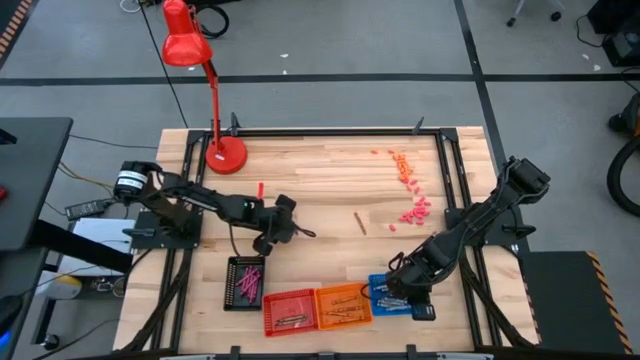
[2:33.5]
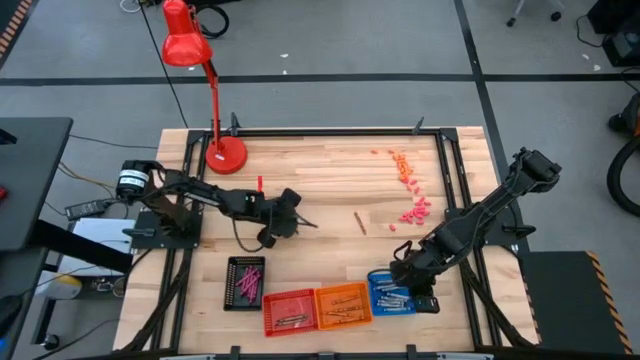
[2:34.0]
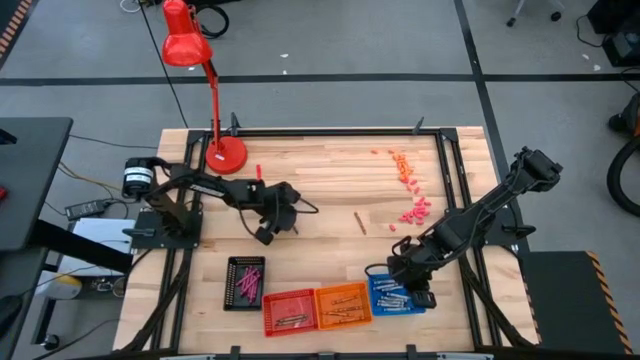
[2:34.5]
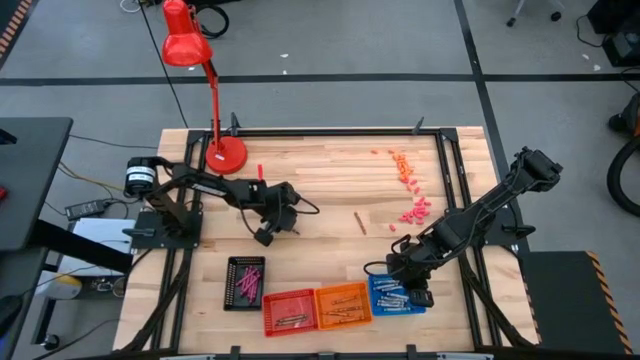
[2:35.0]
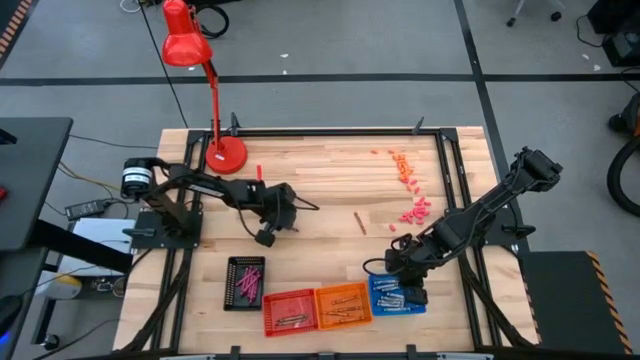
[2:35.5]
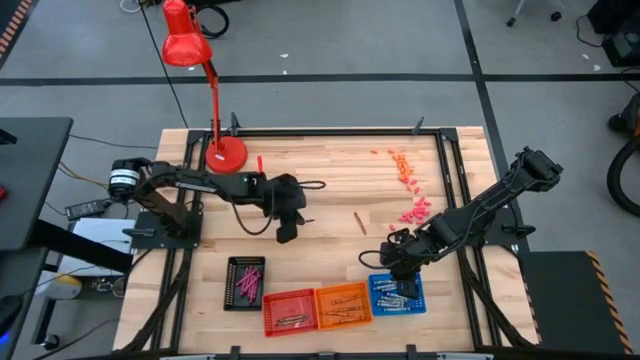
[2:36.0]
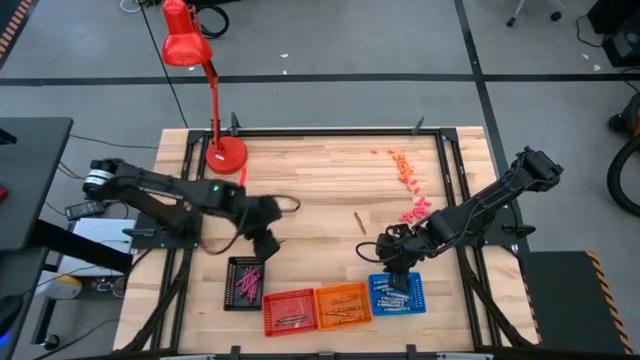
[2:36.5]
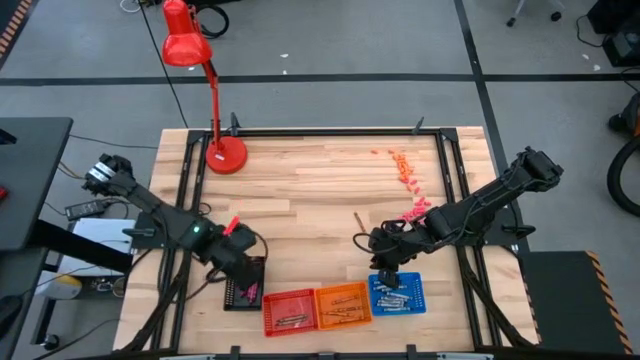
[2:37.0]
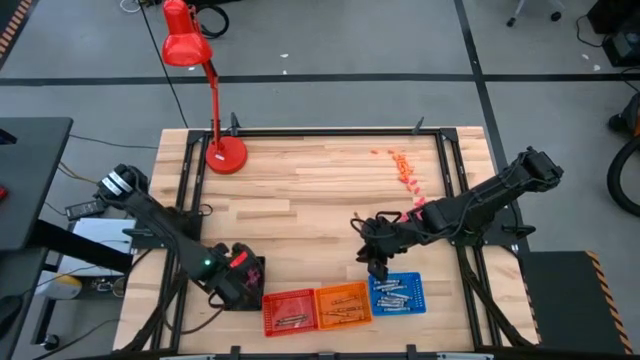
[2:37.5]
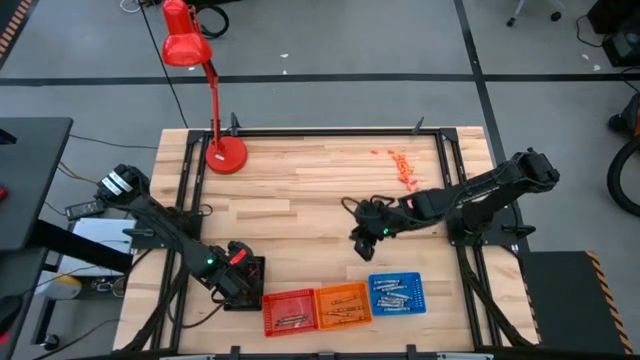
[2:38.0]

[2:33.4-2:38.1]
Task: Sort crayons
Put the violet crayon into the black bin

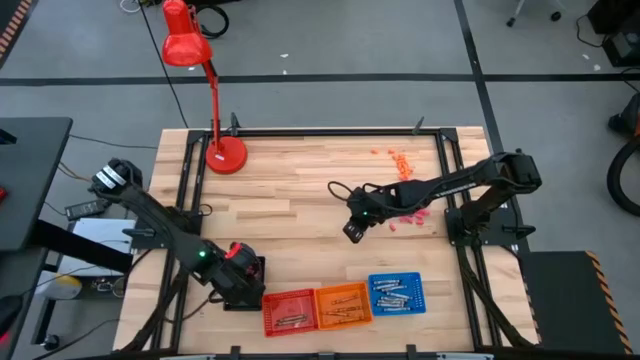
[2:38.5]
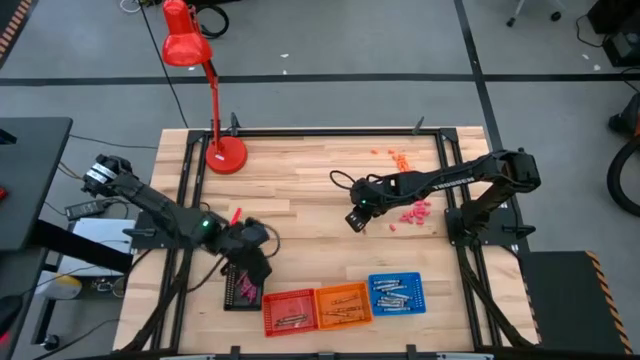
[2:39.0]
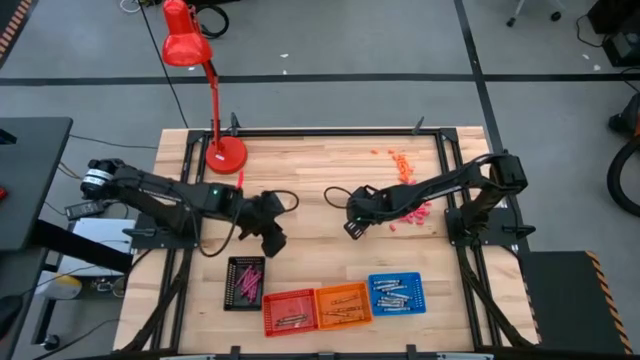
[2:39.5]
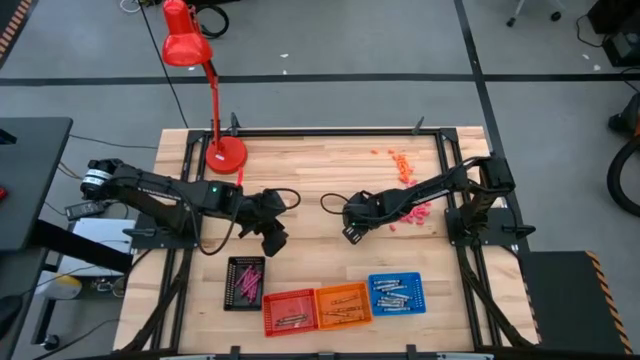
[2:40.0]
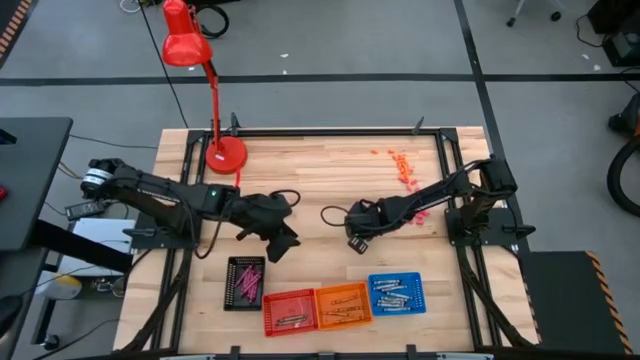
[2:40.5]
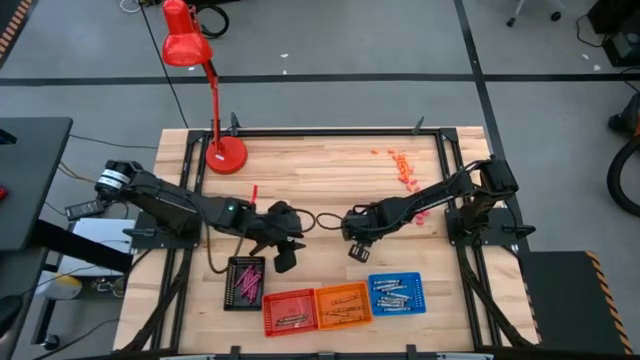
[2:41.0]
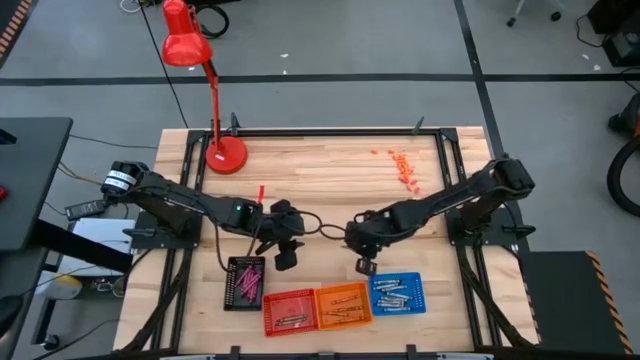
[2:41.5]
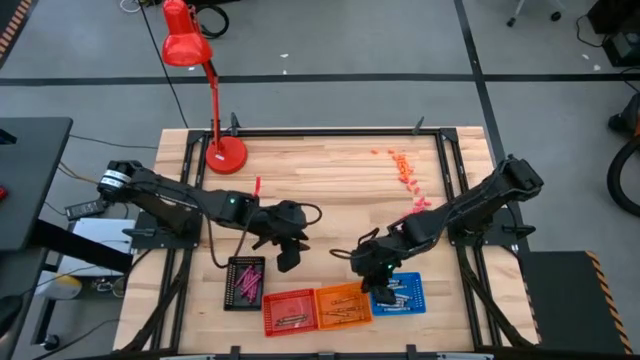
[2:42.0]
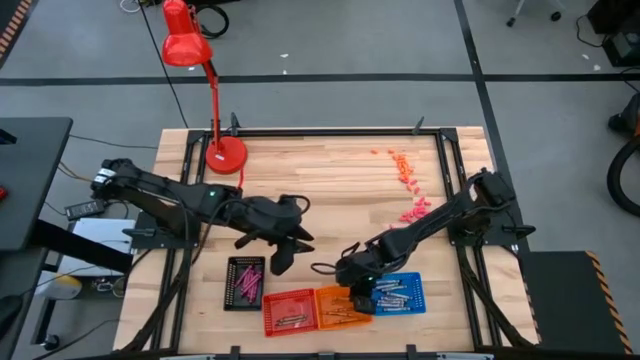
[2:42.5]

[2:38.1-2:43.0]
Put the orange crayon into the orange bin

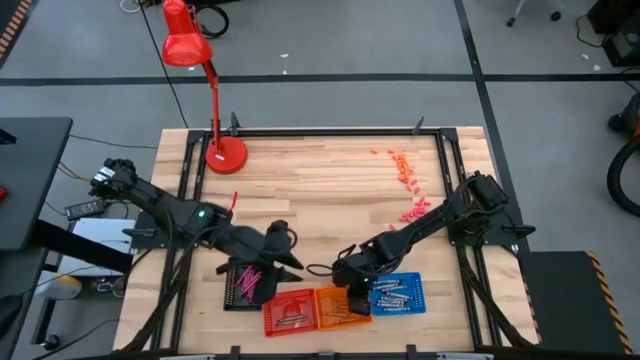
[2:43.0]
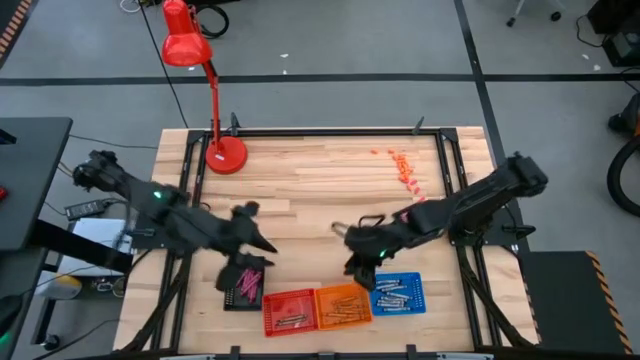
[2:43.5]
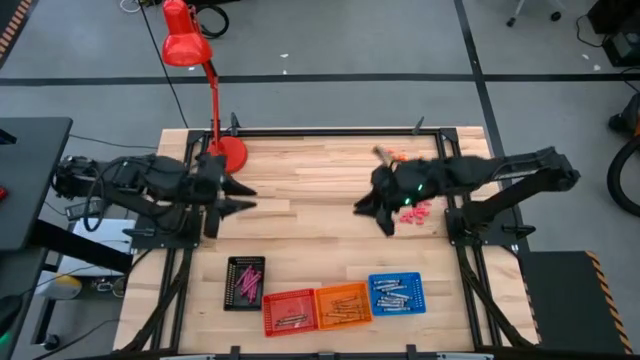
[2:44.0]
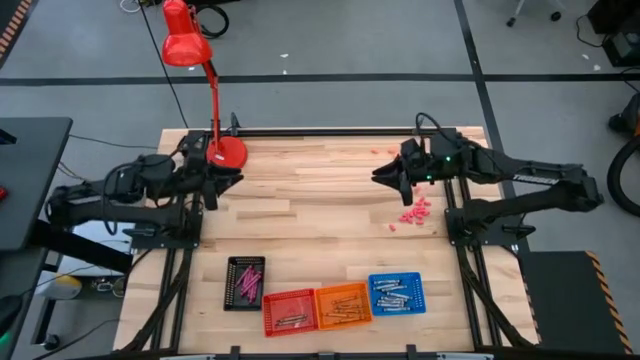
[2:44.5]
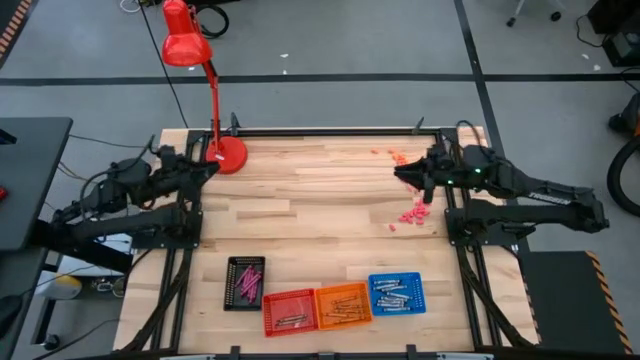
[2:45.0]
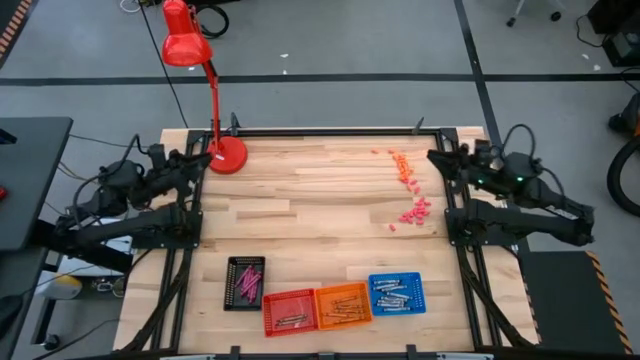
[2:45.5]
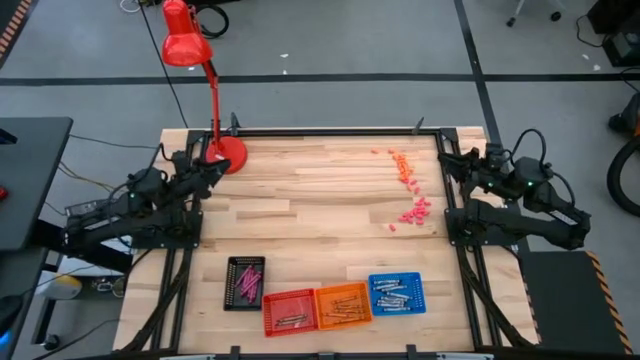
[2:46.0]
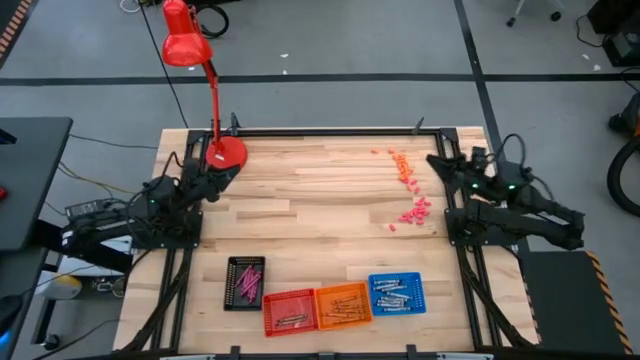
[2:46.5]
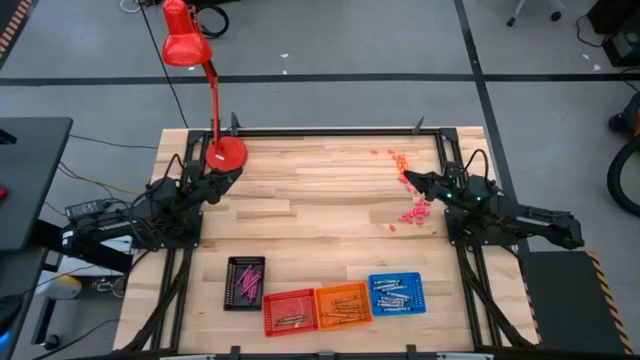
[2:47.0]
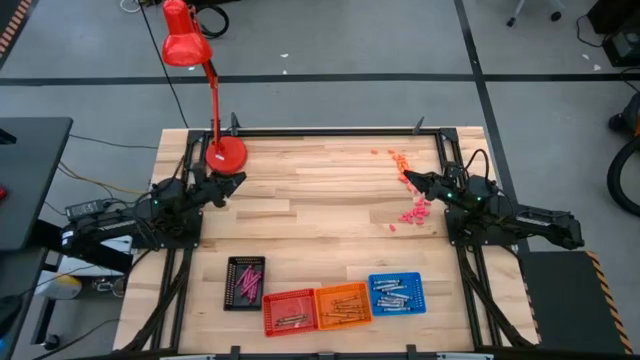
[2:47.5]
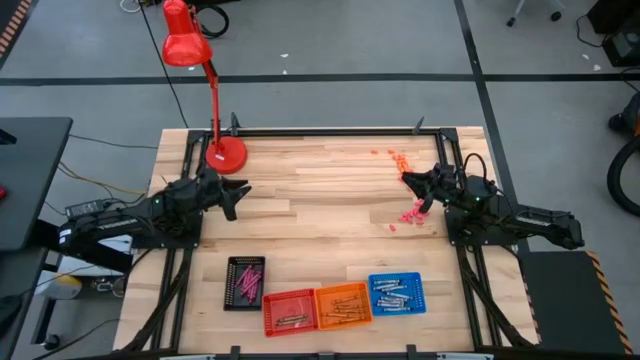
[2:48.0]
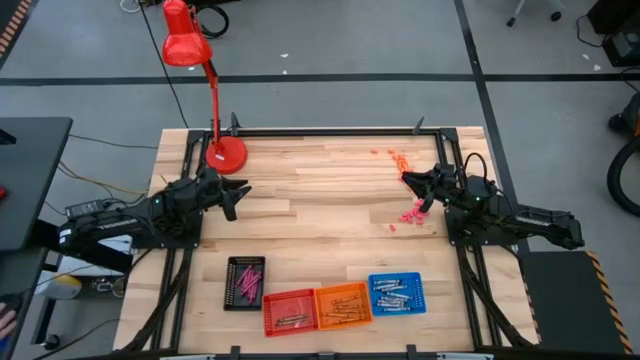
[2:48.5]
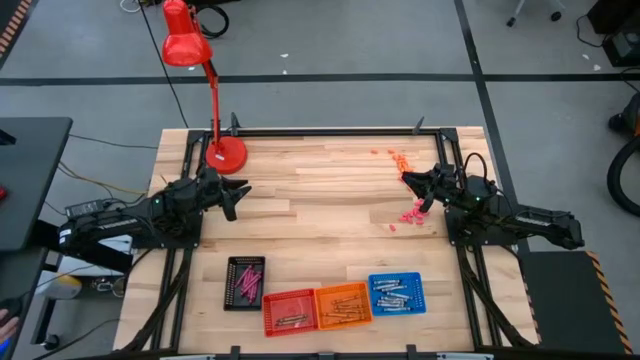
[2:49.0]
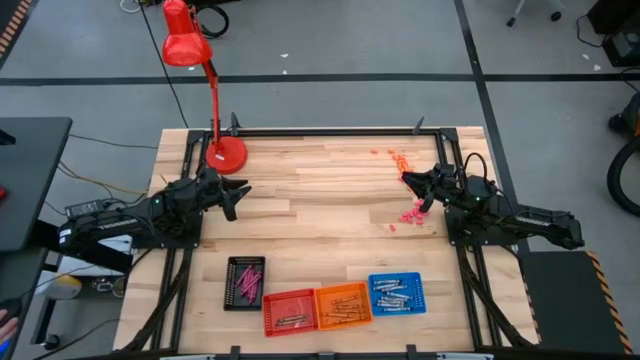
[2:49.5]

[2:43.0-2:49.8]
Return to Home Position

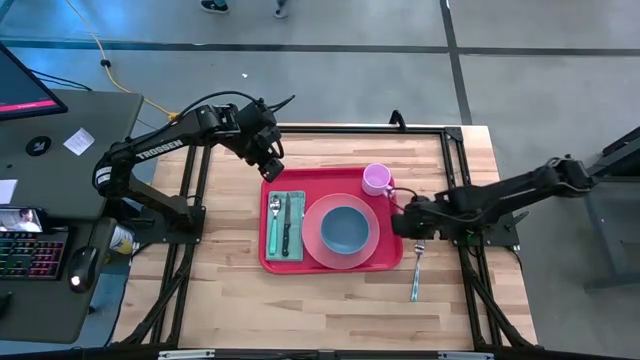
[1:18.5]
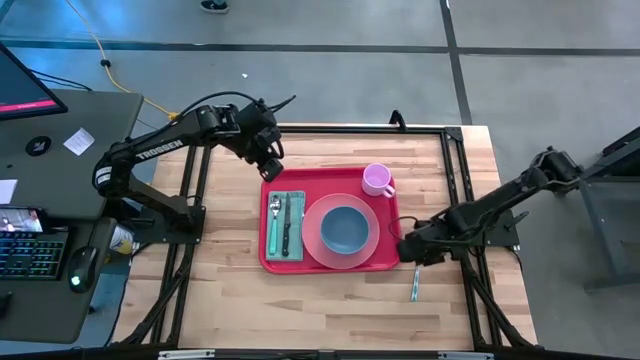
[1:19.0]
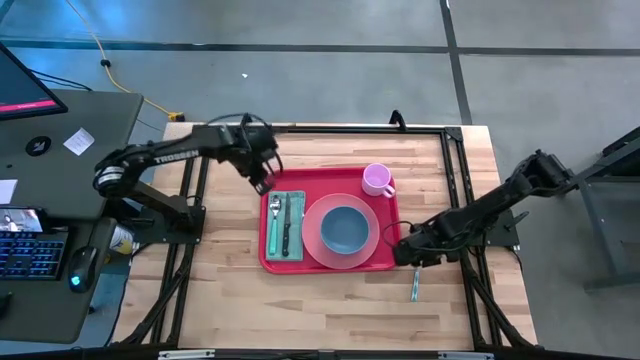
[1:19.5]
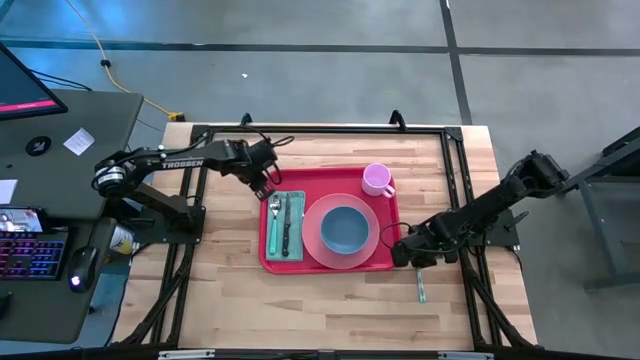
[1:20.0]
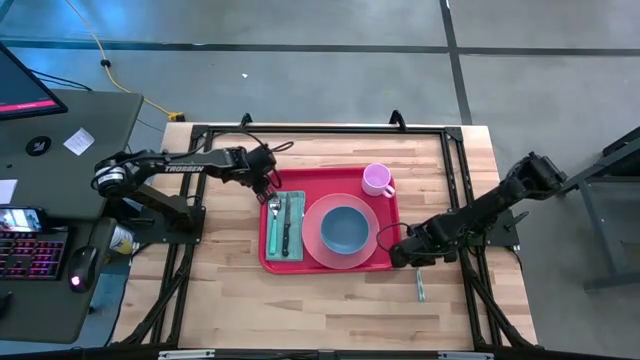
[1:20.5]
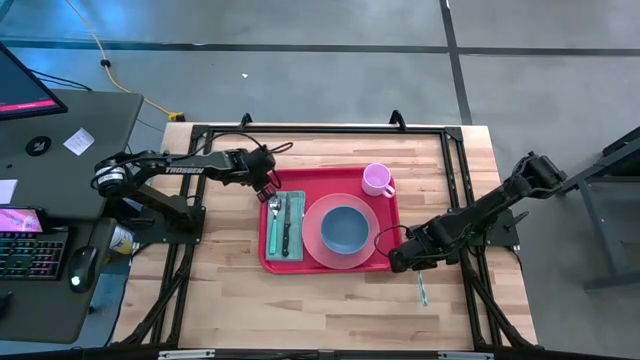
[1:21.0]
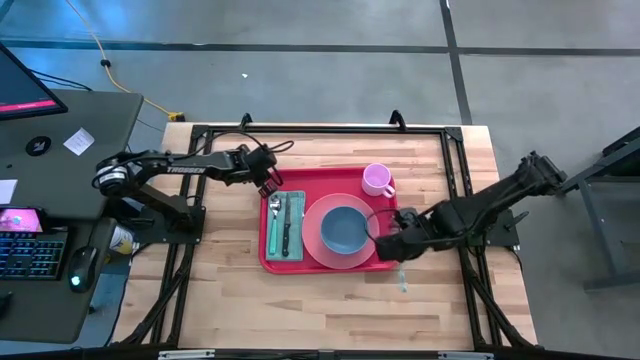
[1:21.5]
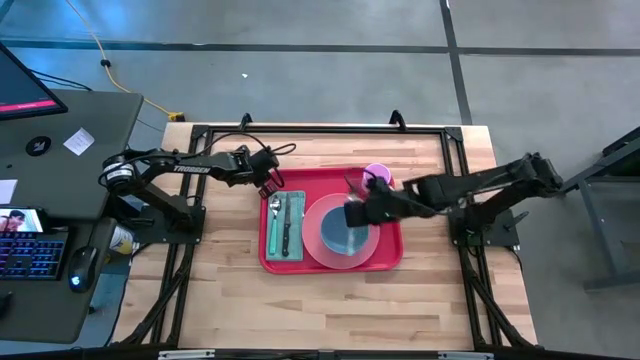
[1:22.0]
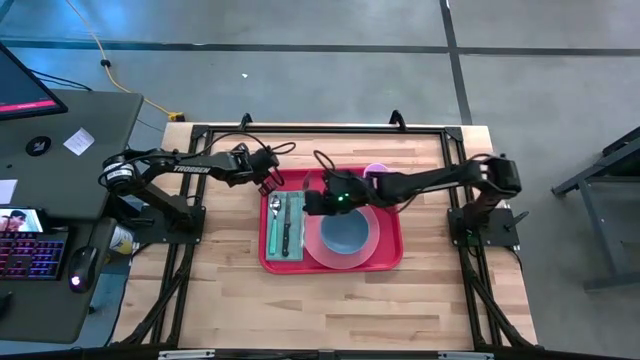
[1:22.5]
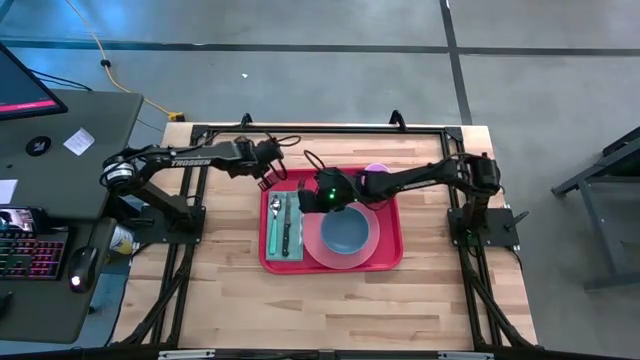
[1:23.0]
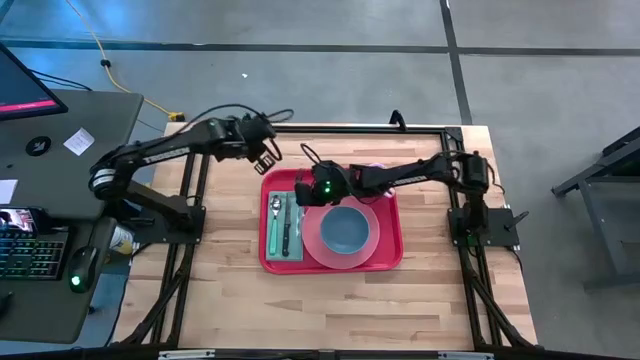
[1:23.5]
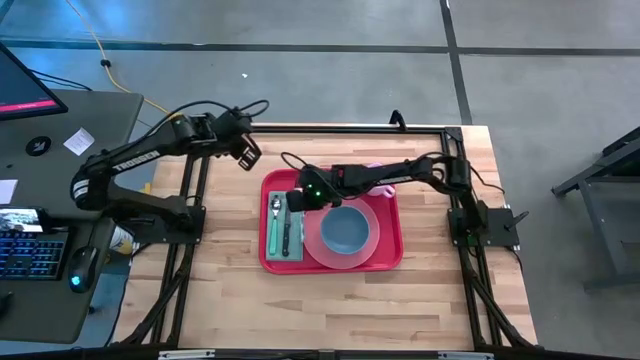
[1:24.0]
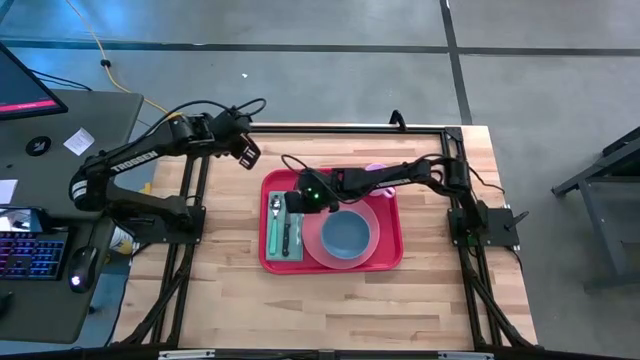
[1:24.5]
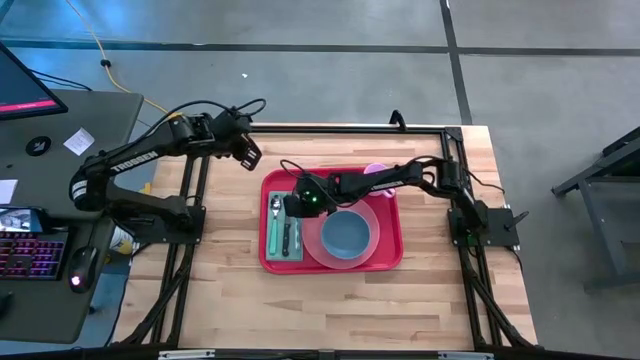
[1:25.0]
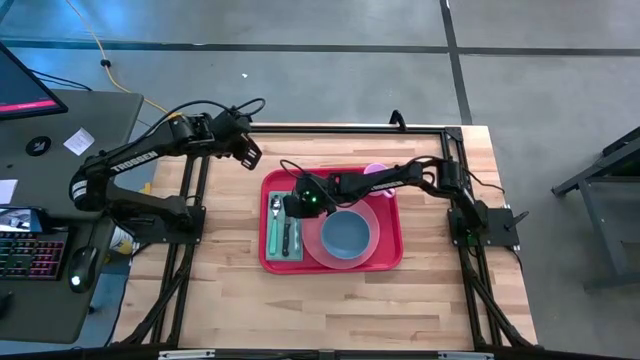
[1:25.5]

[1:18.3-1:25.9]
Task: Set up tray
Put the blue fork on the blue napkin to the right of the black knife
